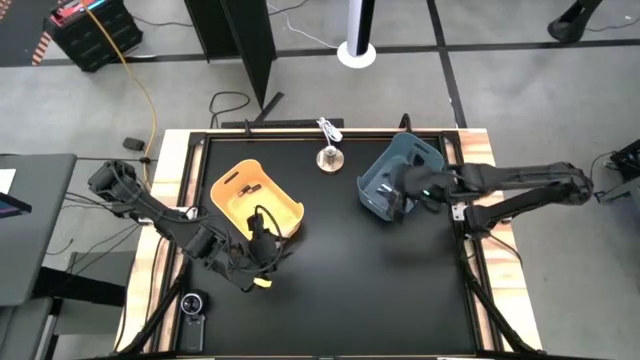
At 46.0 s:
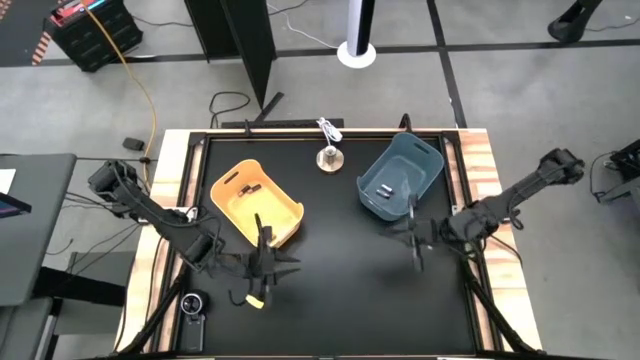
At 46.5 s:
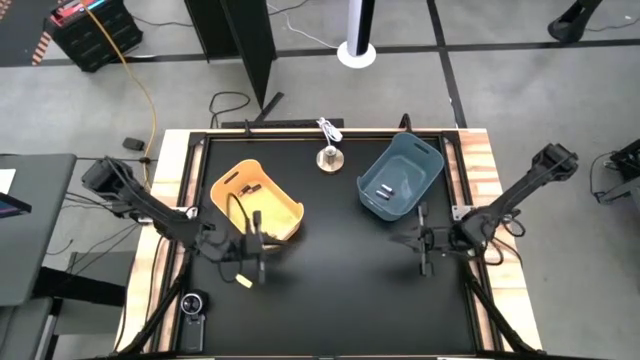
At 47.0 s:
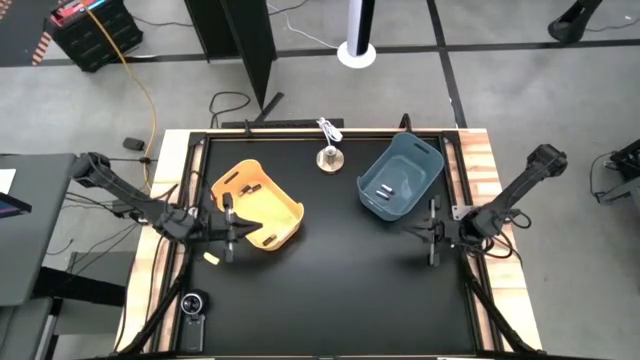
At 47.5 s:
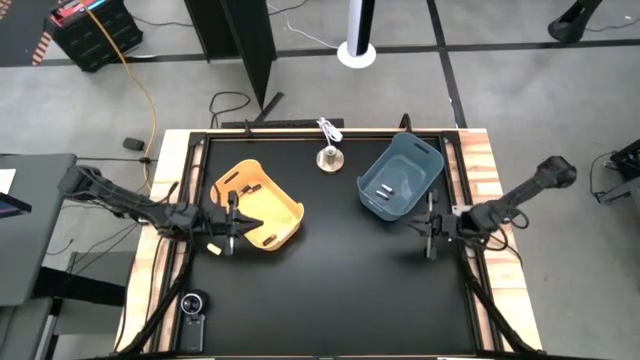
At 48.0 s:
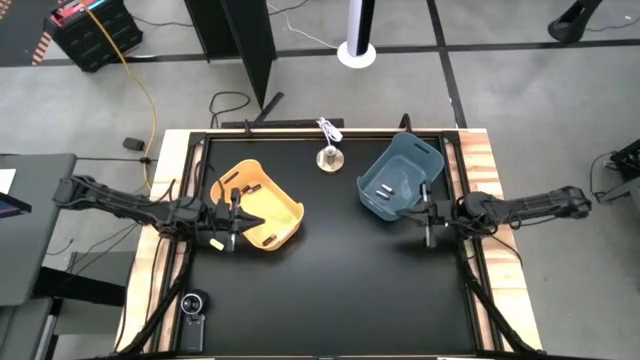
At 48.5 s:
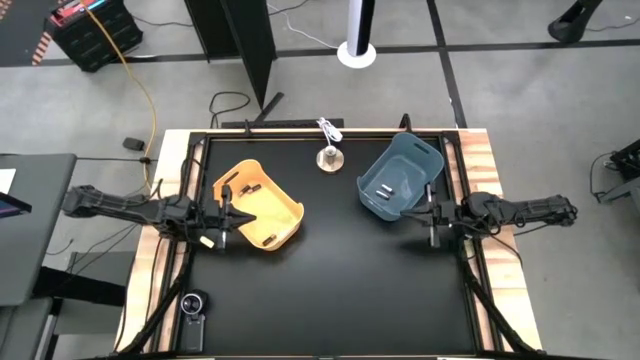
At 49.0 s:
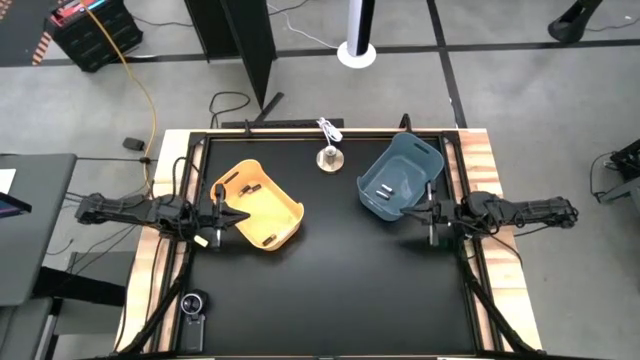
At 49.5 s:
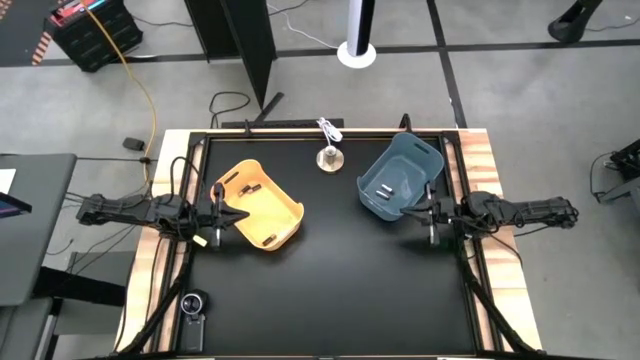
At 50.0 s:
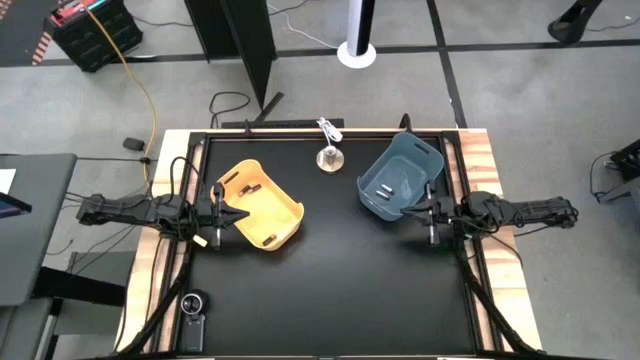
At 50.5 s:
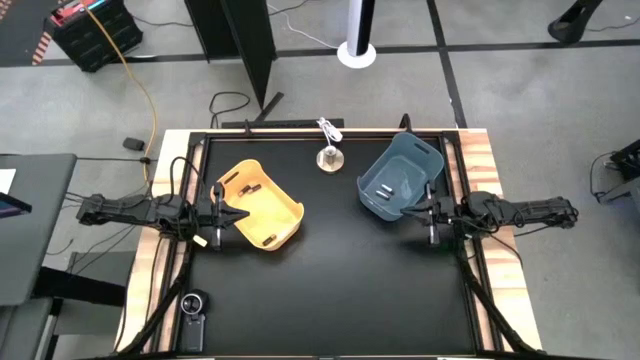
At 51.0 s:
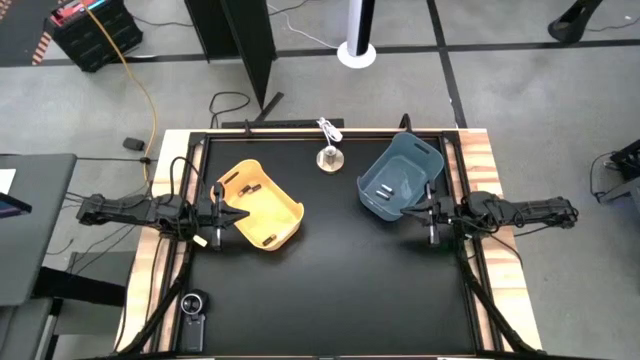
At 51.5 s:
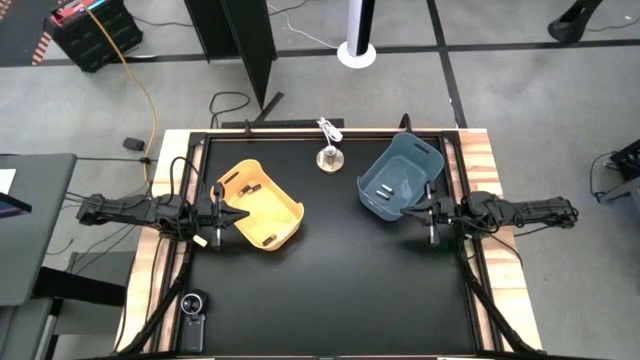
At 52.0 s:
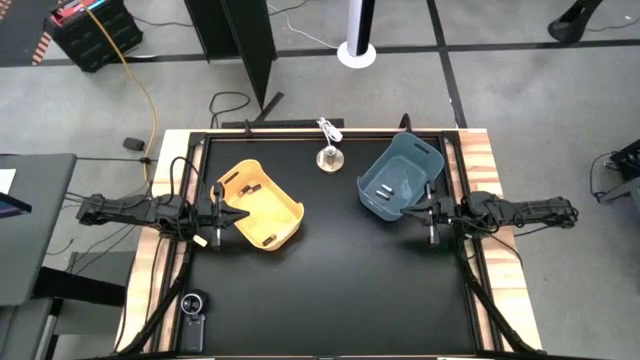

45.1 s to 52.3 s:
Task: Sort batteries
Return to Home Position

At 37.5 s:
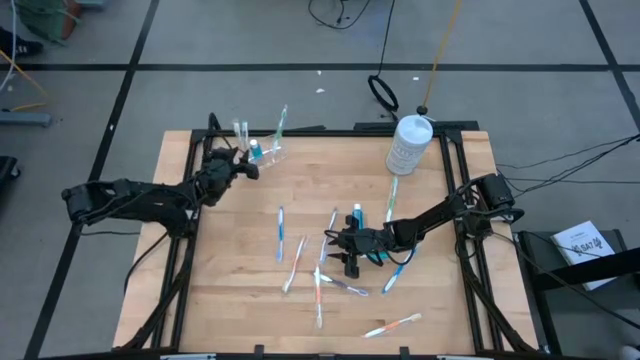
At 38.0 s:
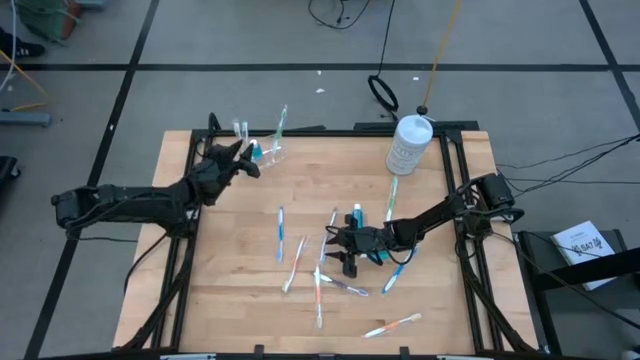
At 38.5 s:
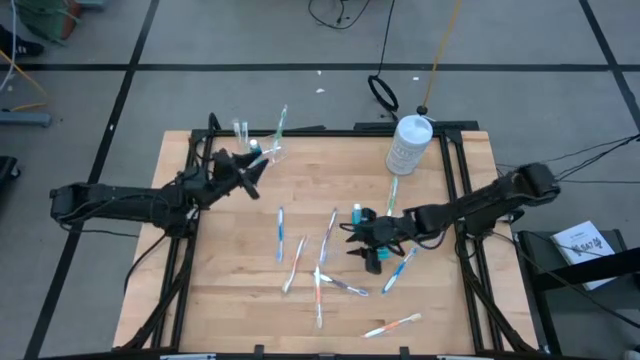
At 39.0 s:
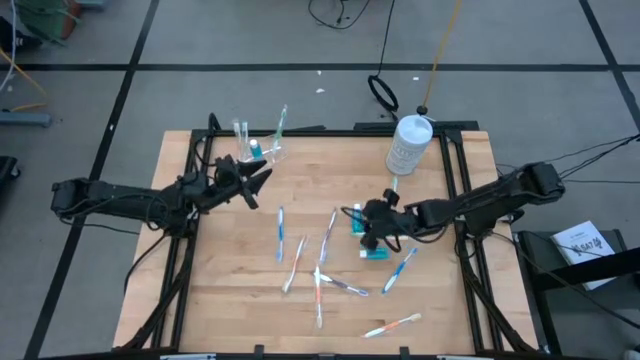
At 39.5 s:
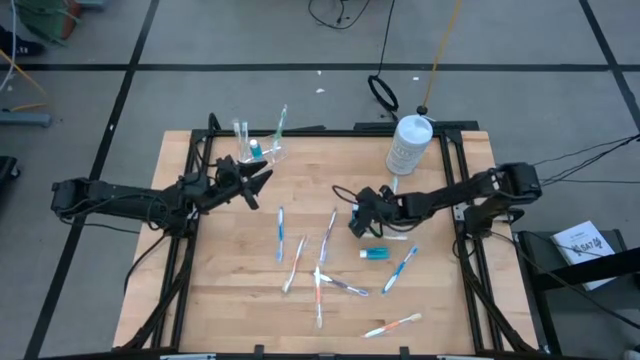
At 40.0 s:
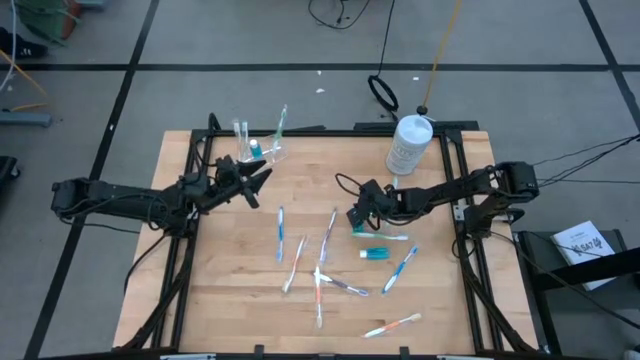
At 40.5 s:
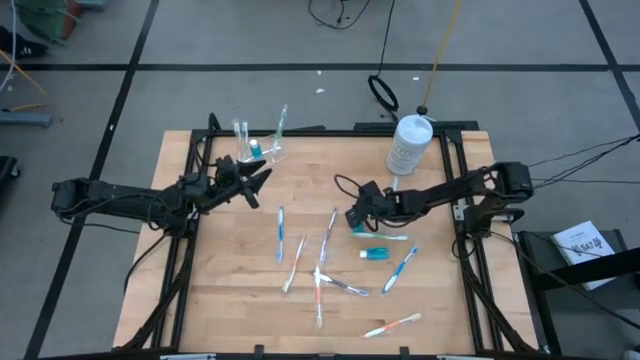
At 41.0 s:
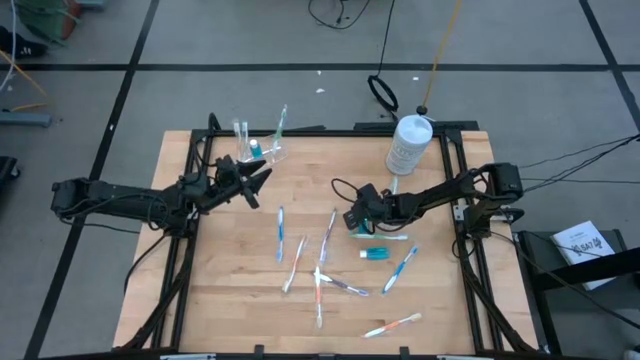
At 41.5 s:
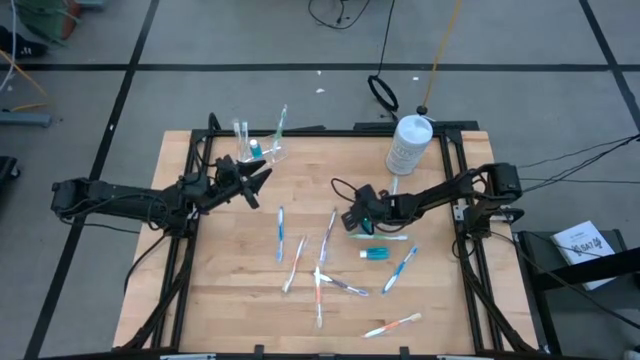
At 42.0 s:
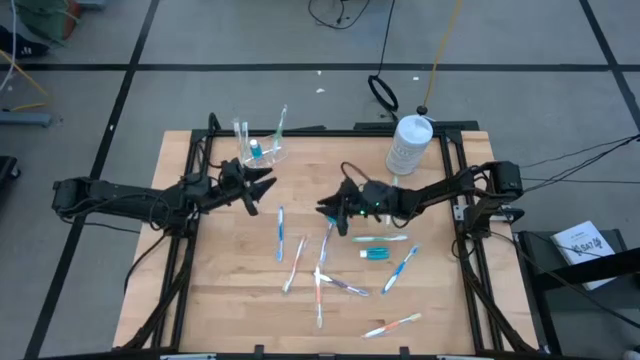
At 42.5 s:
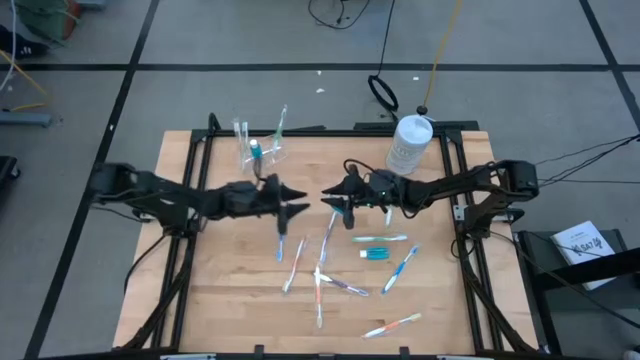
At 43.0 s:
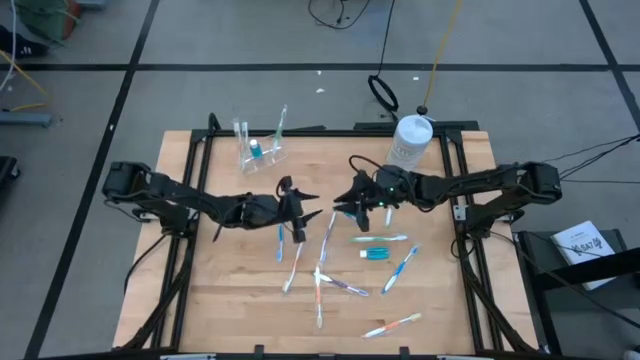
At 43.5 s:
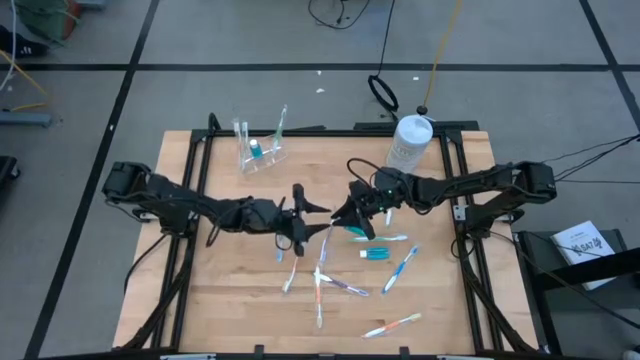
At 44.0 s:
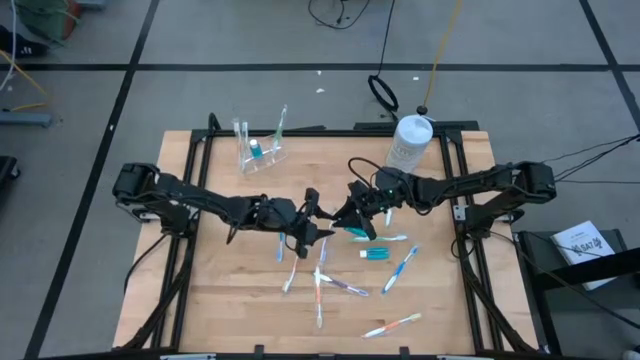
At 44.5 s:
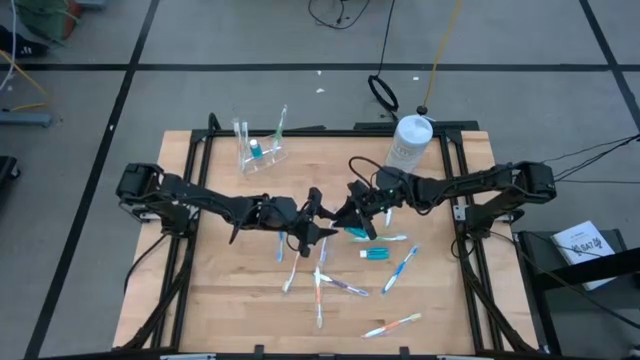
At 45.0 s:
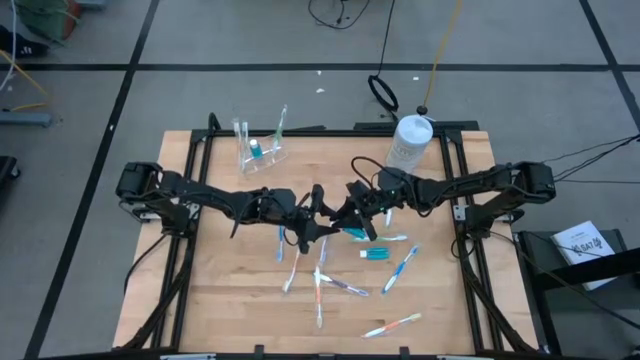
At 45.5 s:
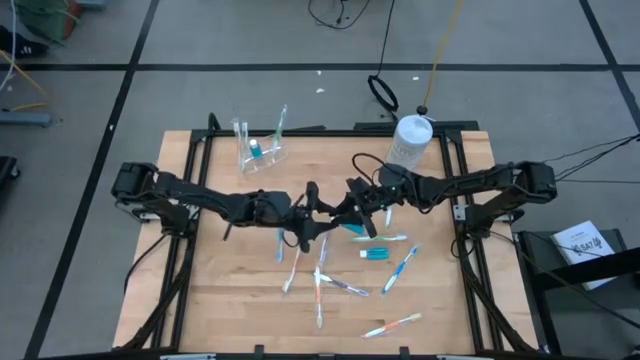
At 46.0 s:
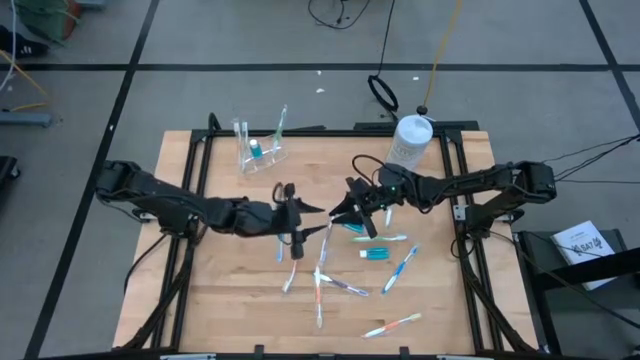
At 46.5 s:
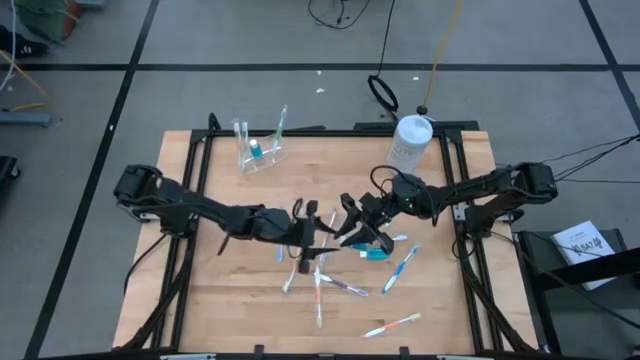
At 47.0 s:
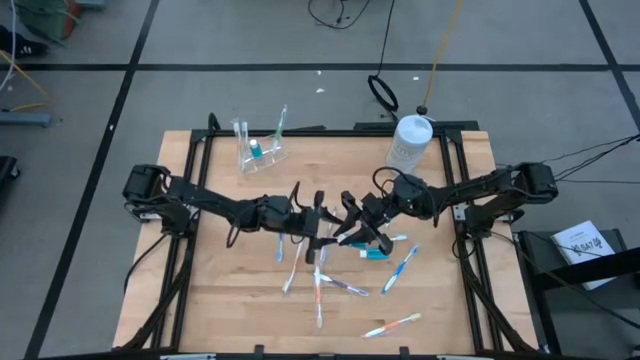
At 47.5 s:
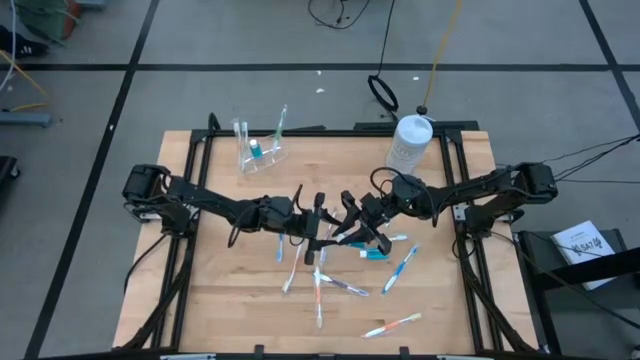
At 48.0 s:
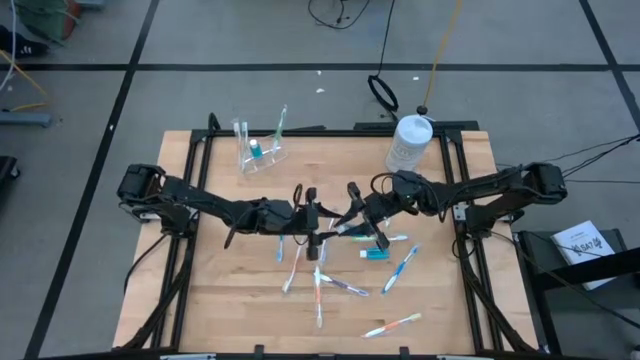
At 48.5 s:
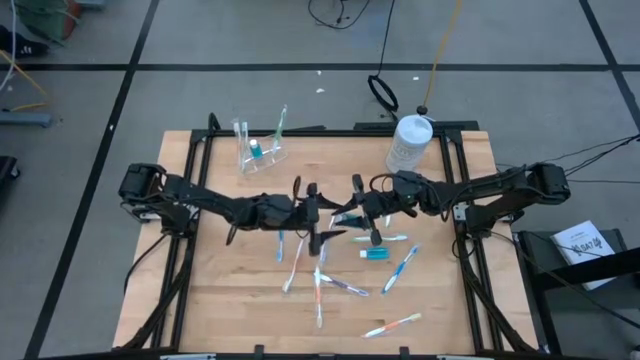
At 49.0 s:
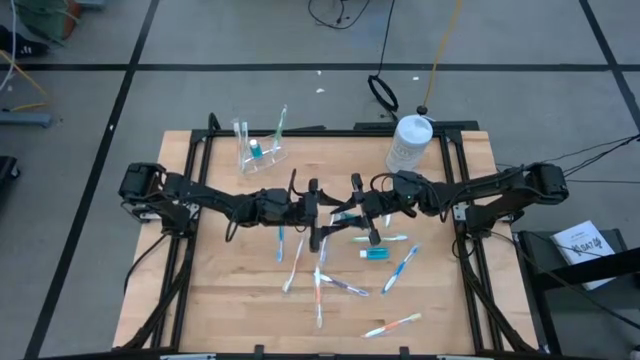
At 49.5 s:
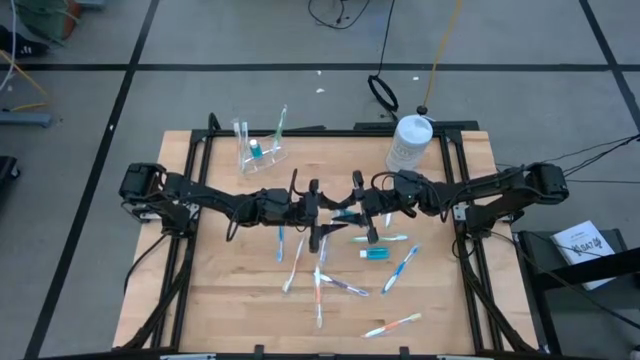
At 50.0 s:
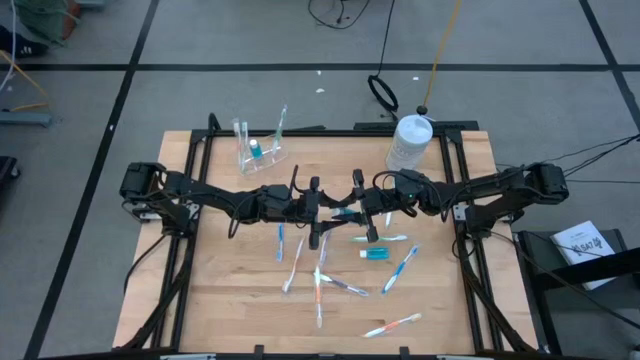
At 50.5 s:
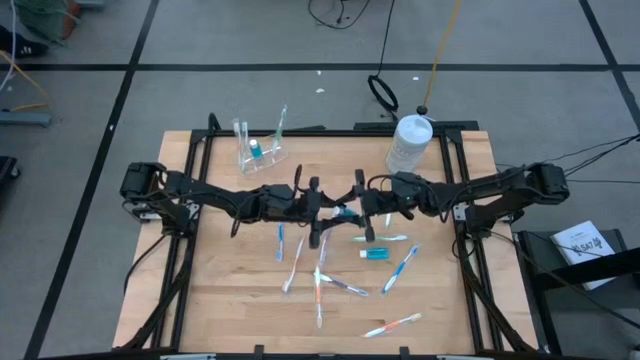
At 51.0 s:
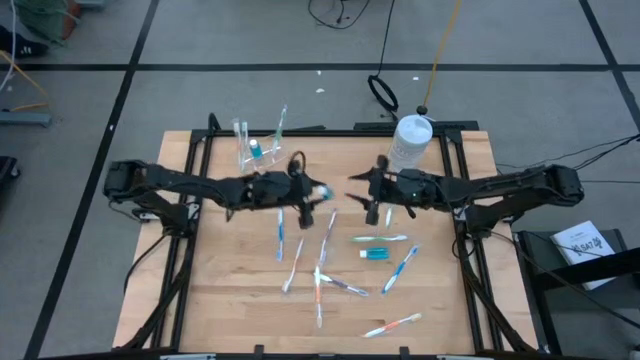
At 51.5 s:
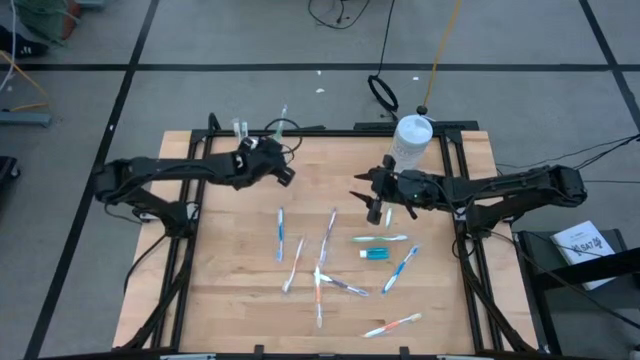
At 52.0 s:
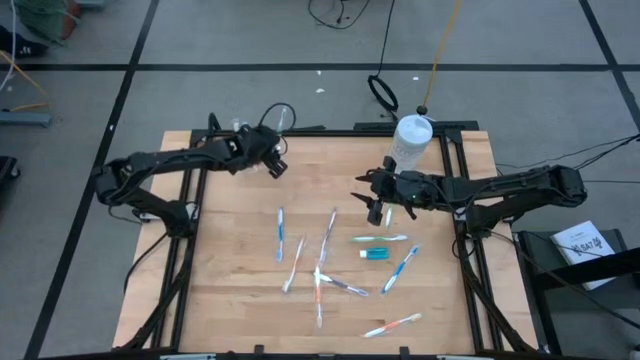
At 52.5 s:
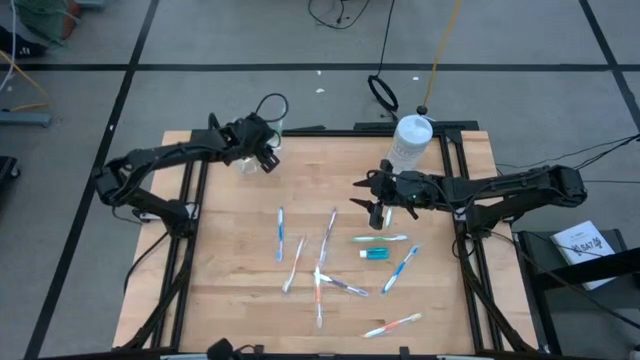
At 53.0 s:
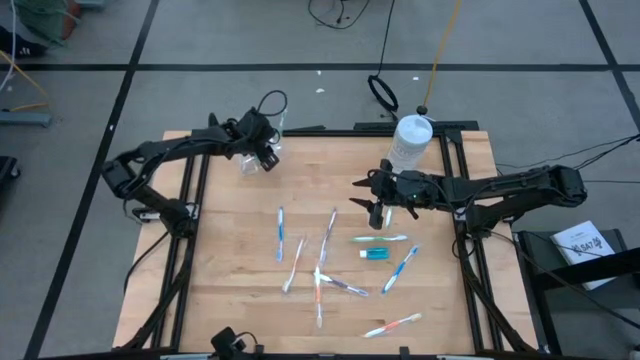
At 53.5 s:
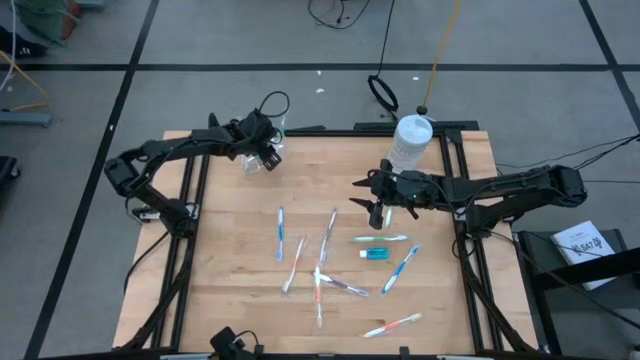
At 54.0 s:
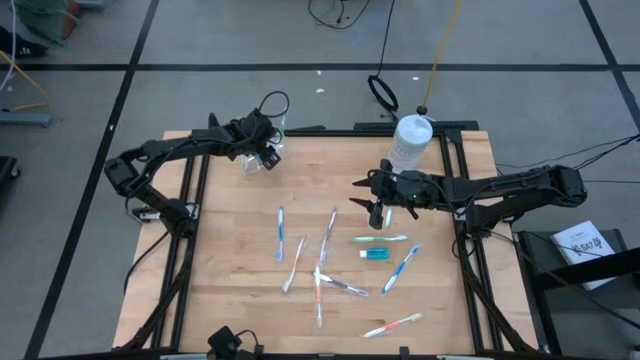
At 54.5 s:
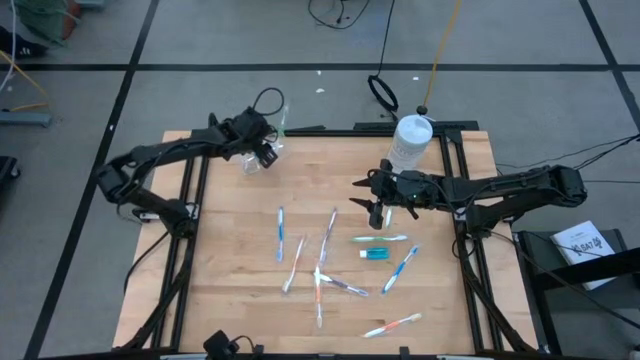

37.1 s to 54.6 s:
Task: Pick & Place toothbrushing station
Put the mouthwash into the transparent organizer
